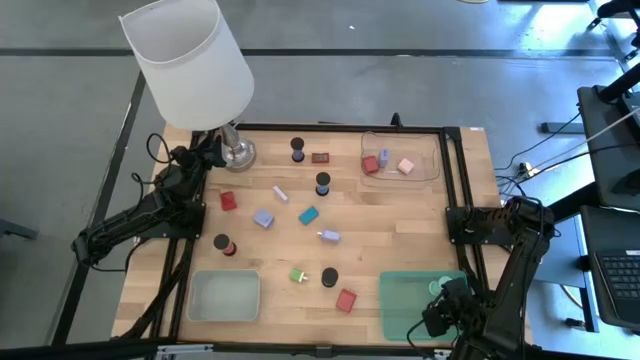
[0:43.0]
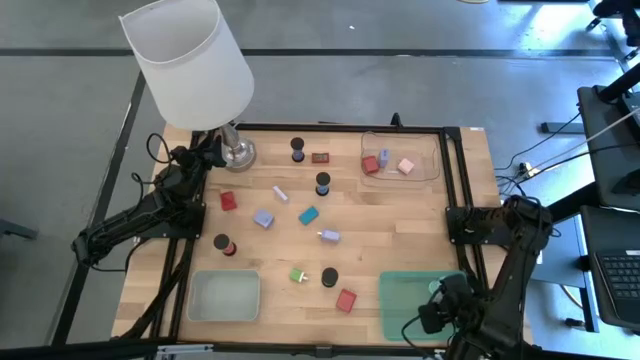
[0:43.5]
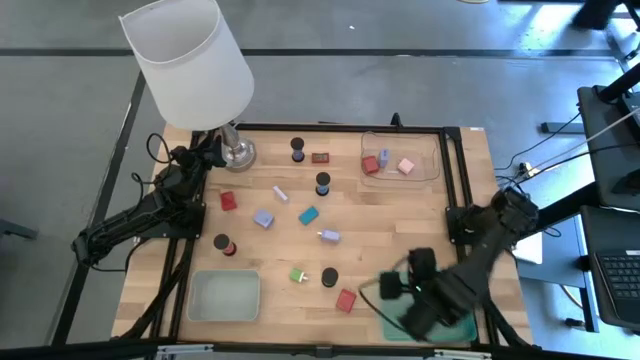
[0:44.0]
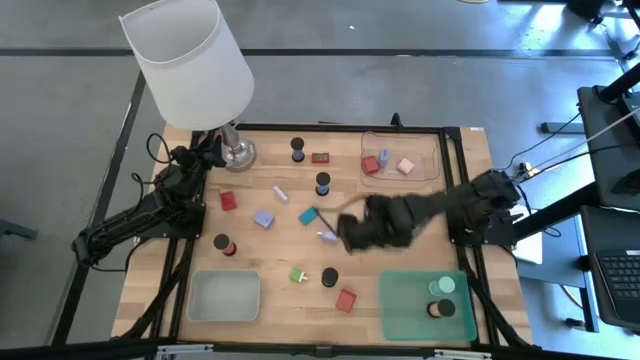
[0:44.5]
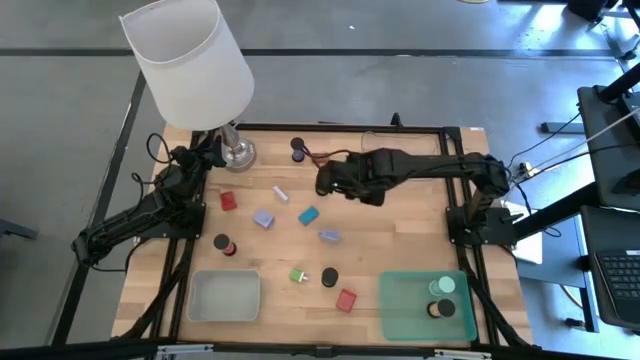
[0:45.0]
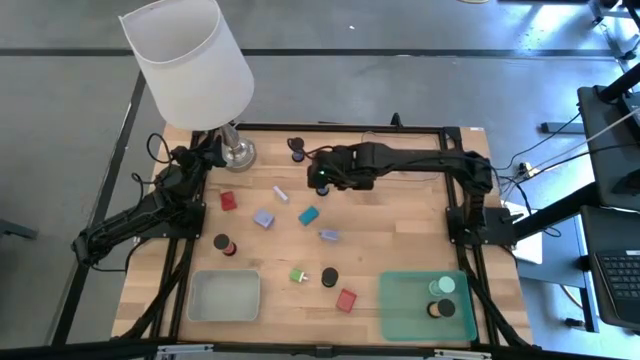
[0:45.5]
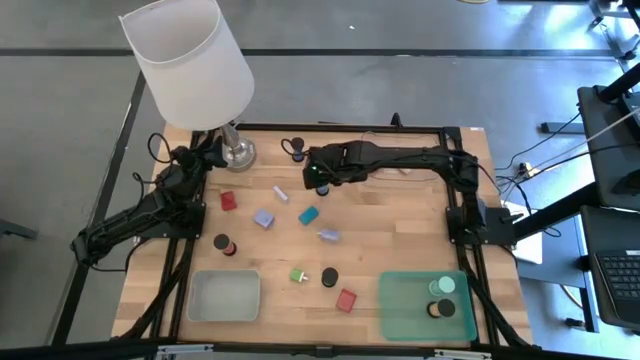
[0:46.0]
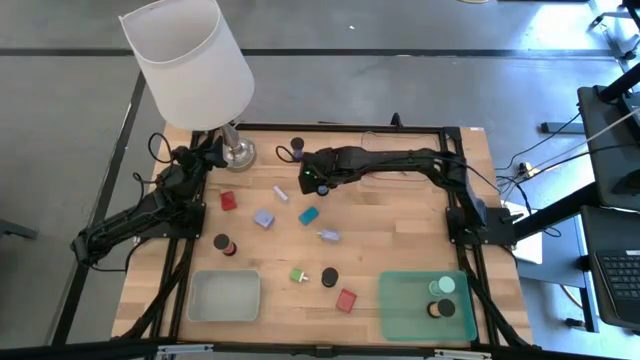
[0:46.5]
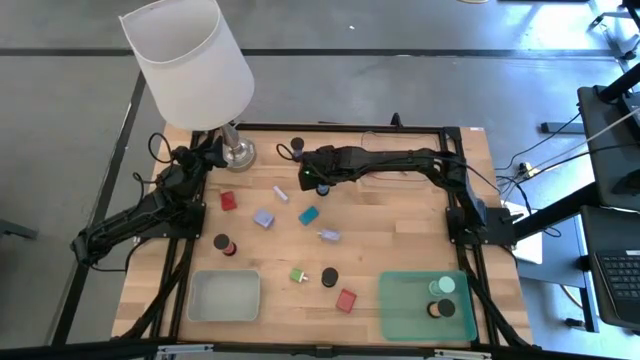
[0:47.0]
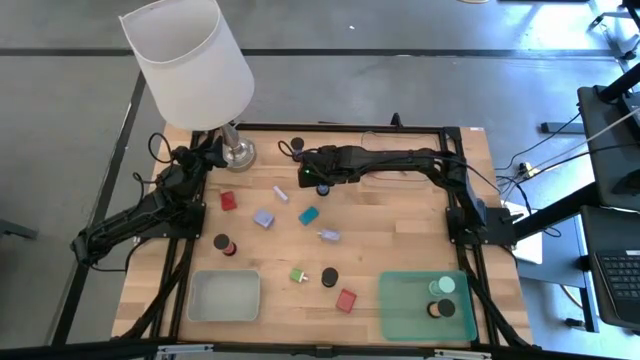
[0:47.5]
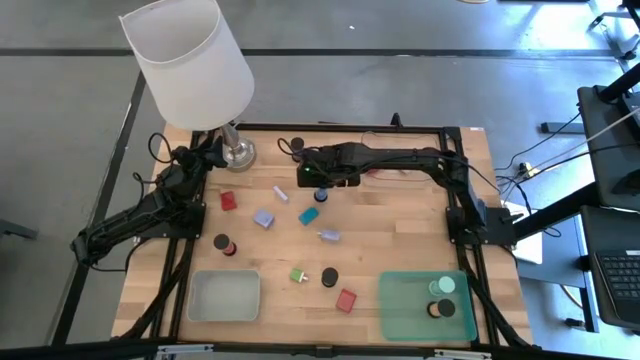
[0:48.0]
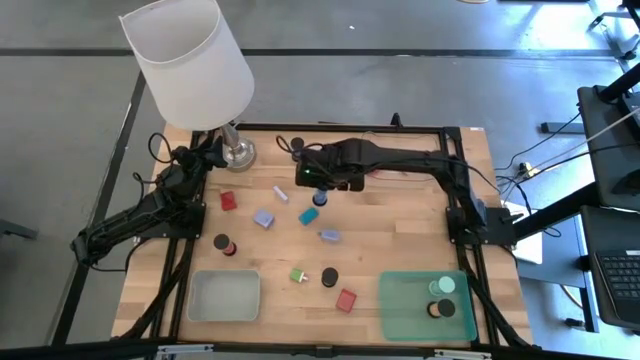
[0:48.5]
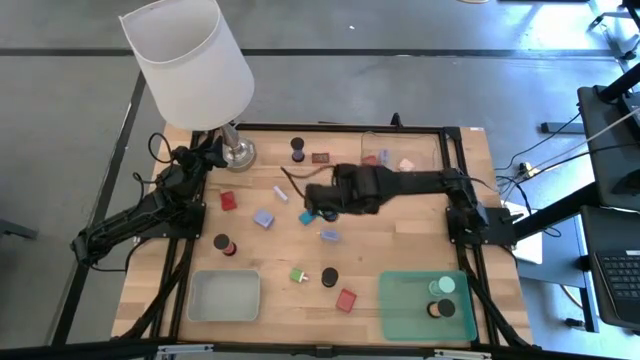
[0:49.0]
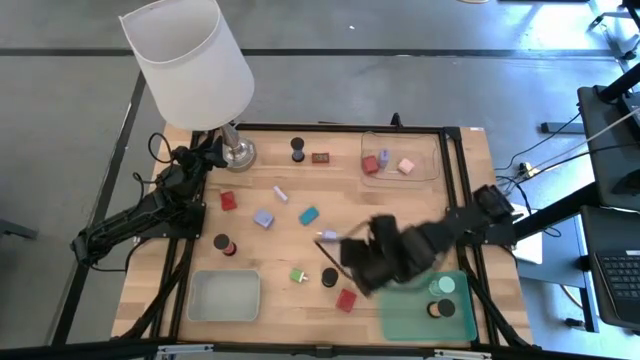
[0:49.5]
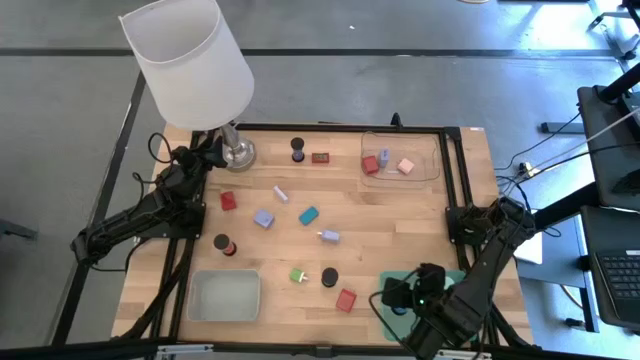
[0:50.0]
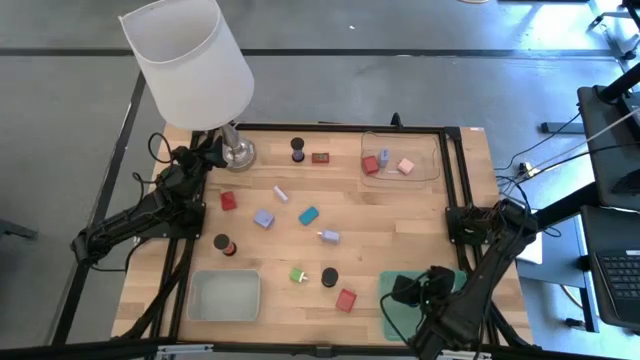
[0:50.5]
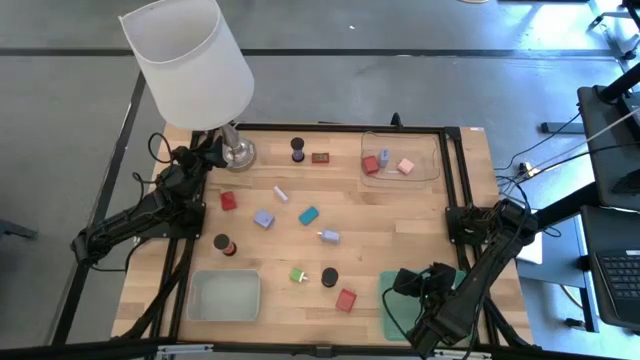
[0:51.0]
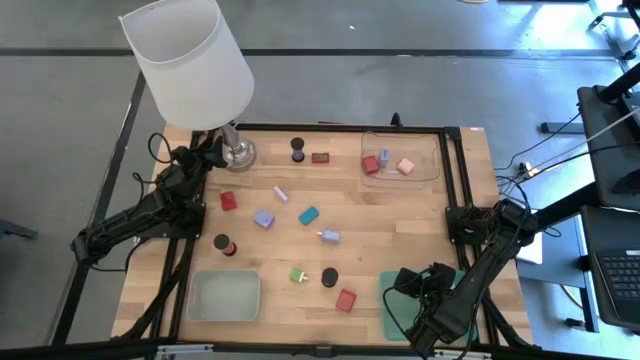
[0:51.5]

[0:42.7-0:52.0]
Task: Pick & Place Office items
Put the bottom blue hourglass into the green bin

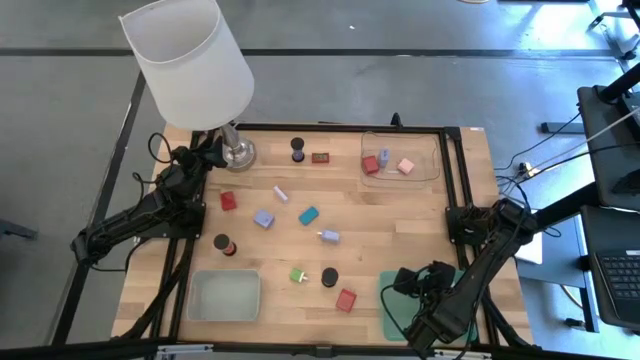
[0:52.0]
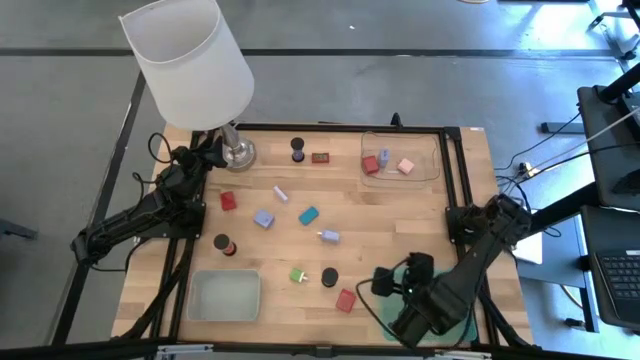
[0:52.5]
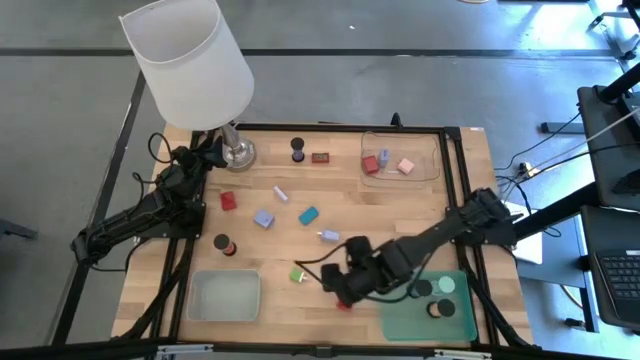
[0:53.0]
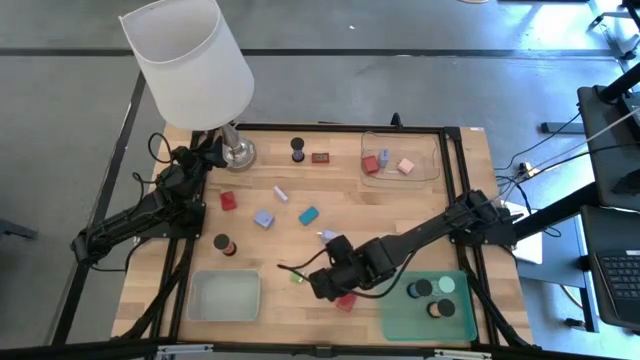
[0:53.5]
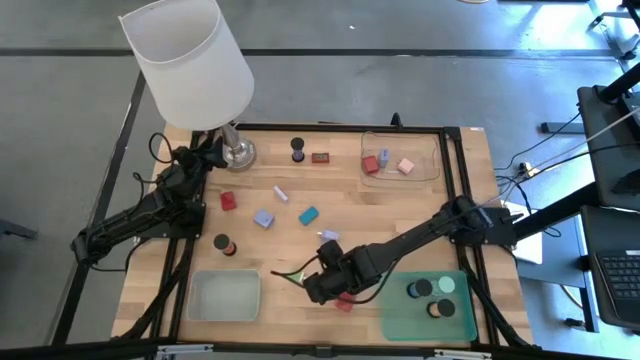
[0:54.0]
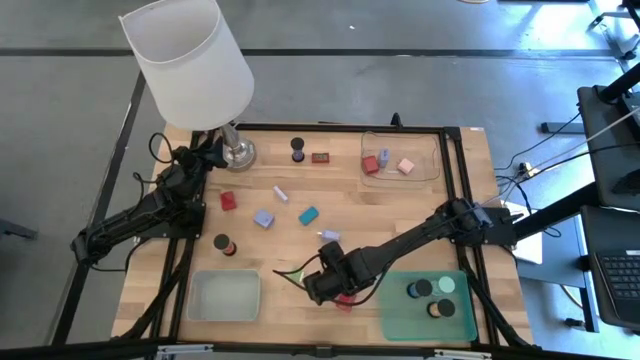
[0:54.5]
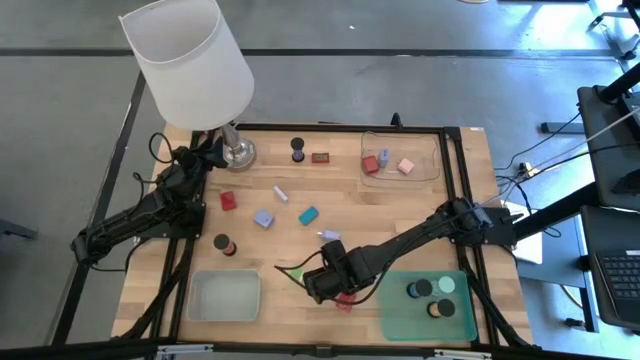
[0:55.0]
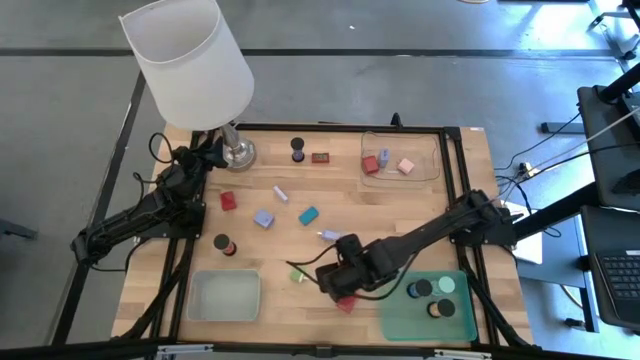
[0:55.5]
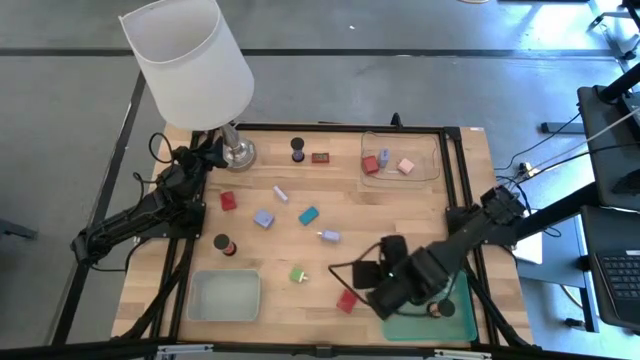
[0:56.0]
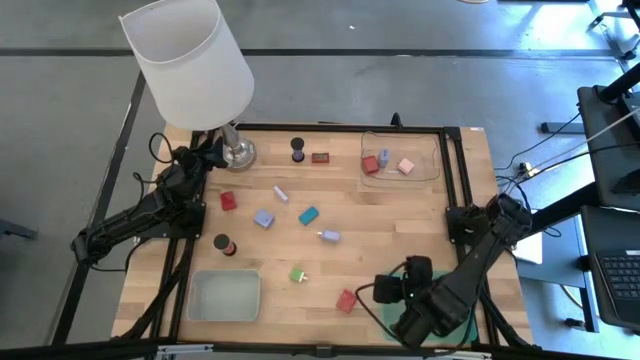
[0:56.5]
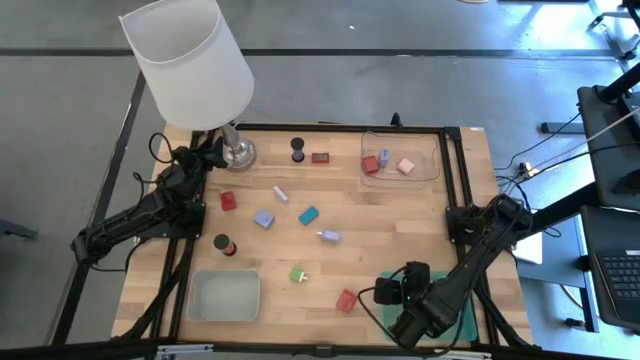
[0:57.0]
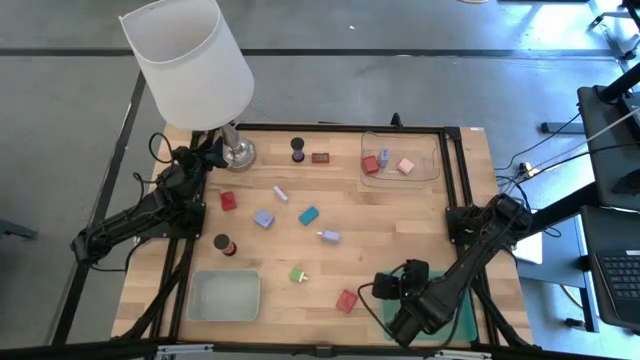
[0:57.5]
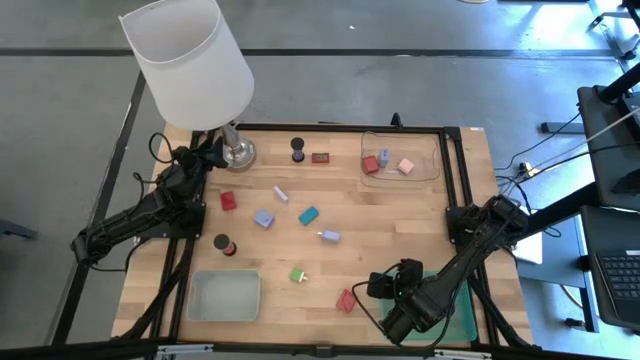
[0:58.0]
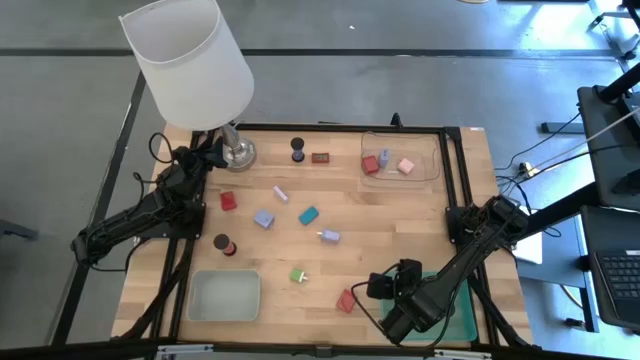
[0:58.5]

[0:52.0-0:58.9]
Put the white hourglass into the green bin

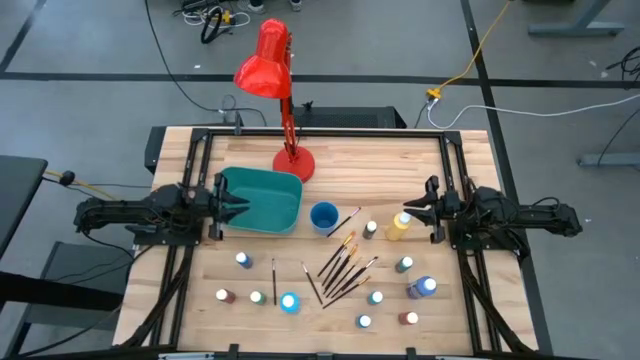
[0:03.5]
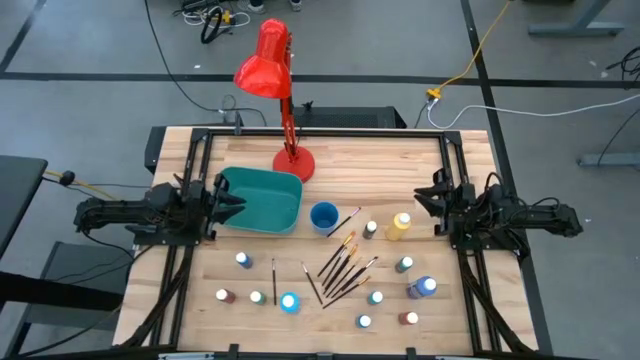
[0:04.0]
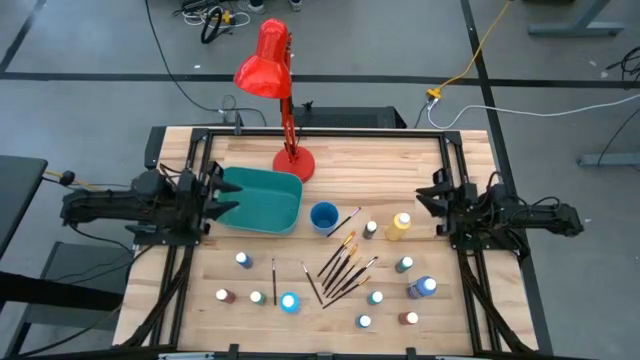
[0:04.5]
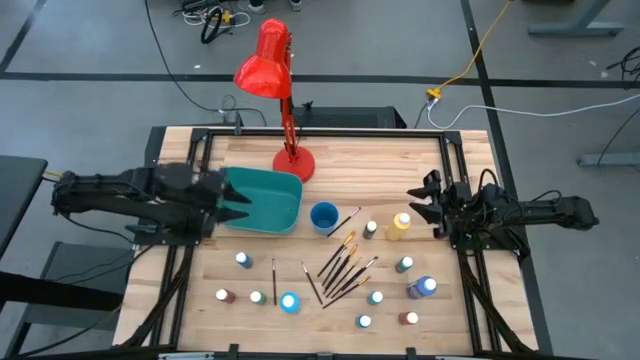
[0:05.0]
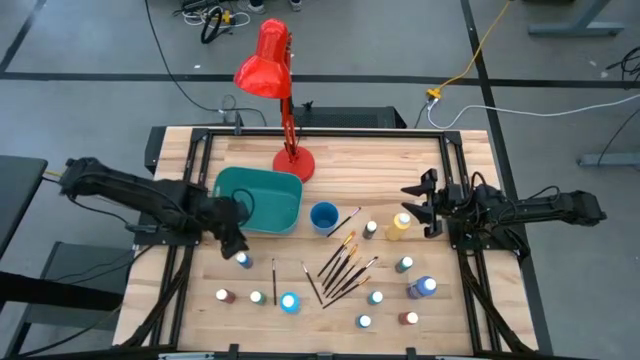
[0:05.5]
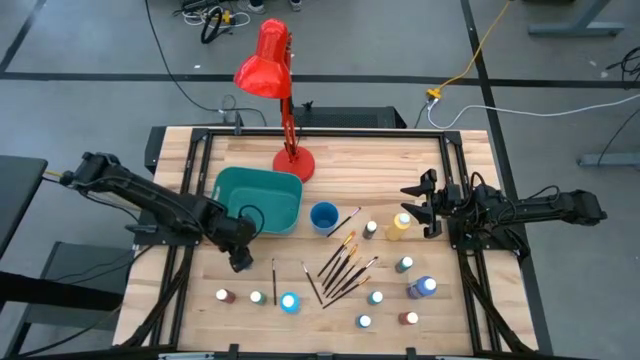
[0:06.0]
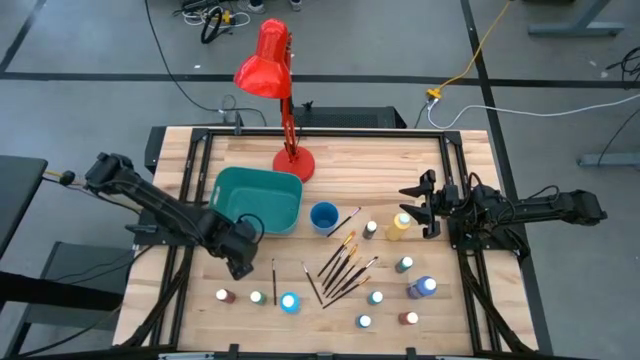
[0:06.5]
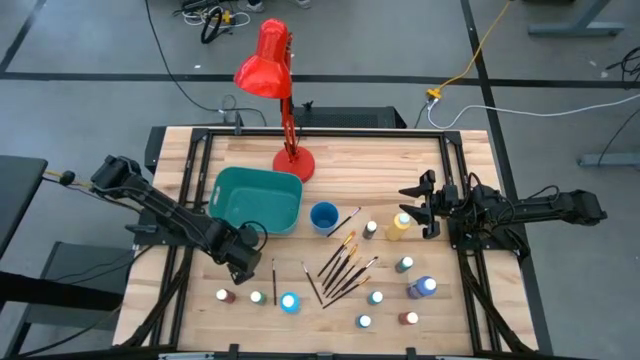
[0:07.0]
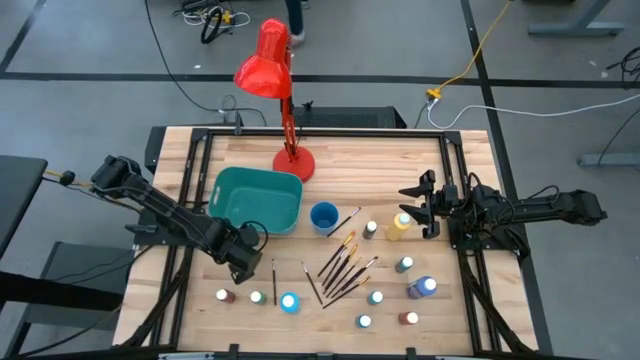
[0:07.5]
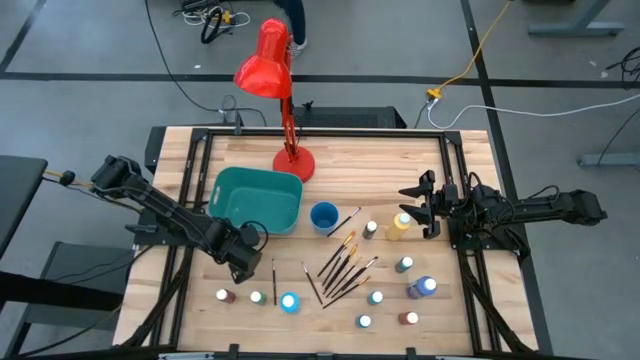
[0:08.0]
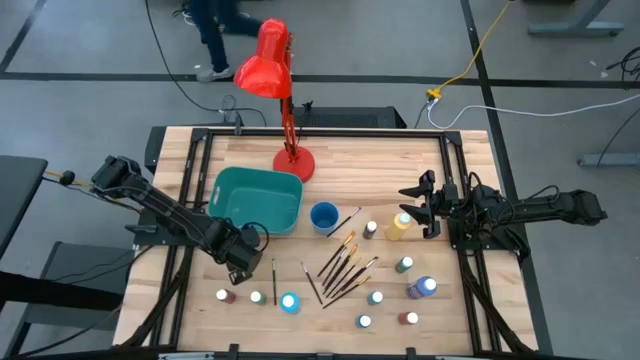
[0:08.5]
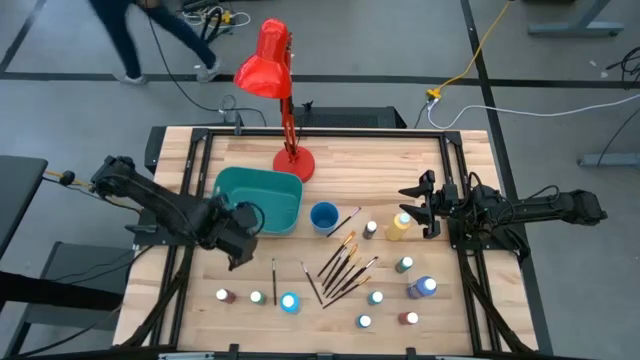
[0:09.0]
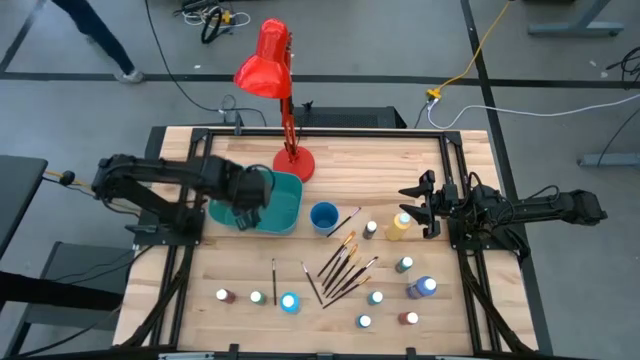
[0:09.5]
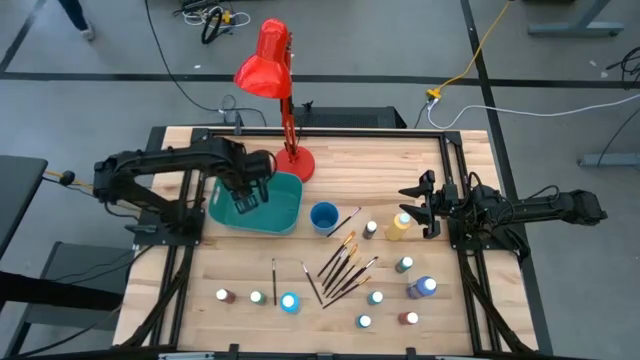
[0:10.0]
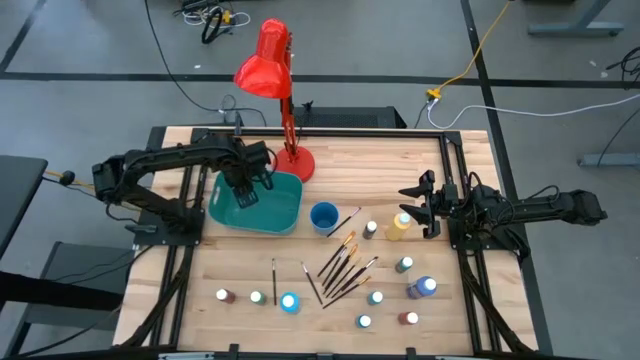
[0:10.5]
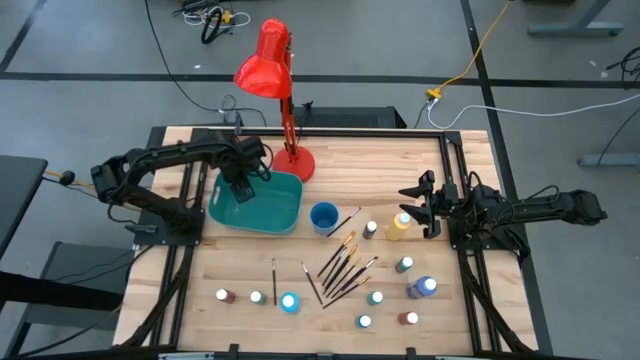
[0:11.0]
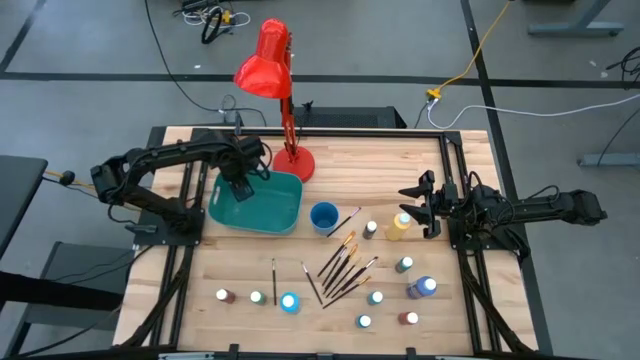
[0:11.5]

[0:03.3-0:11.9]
Task: Pick & Place Paint Supplies
Put the blue paint bottle into the green bin
